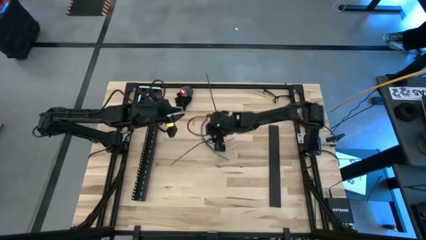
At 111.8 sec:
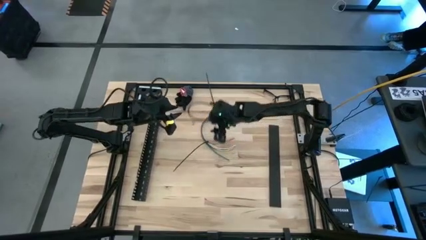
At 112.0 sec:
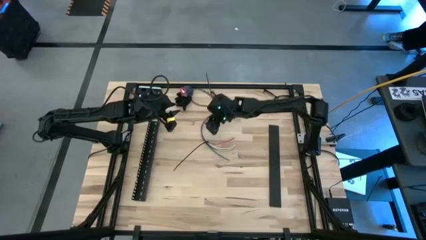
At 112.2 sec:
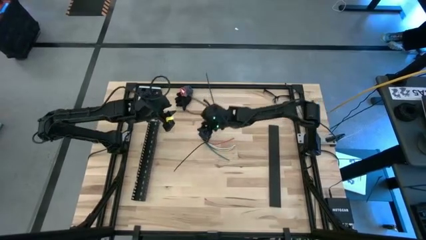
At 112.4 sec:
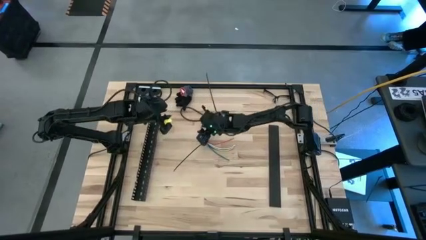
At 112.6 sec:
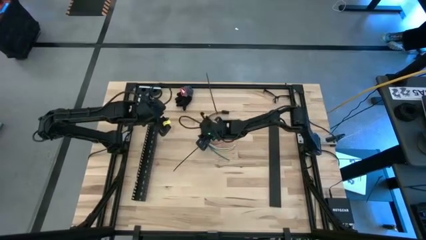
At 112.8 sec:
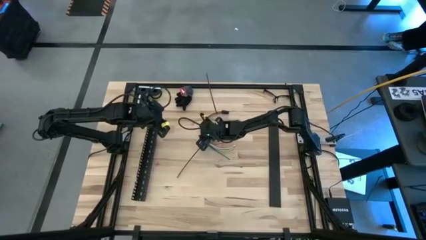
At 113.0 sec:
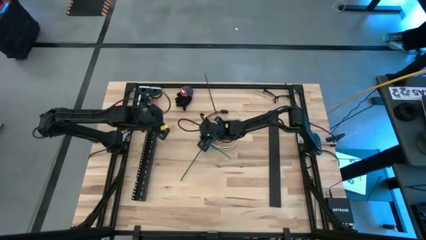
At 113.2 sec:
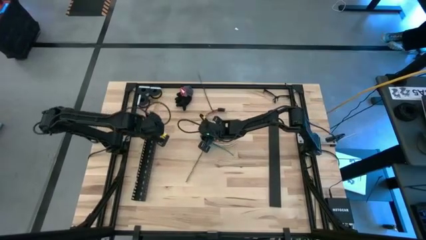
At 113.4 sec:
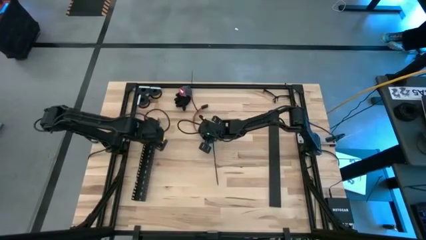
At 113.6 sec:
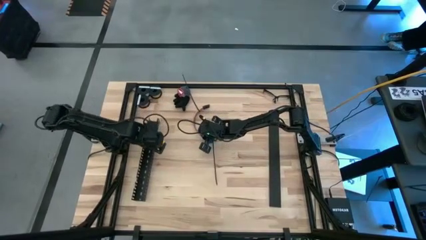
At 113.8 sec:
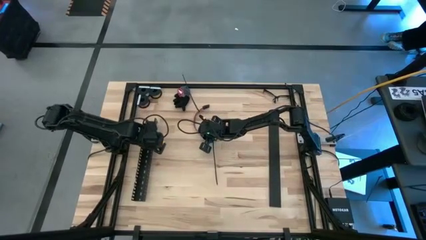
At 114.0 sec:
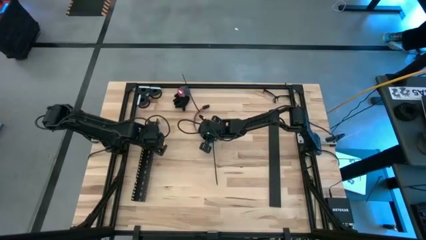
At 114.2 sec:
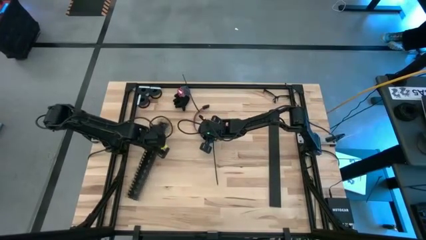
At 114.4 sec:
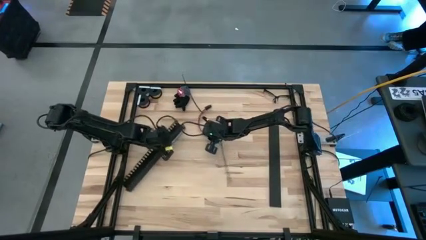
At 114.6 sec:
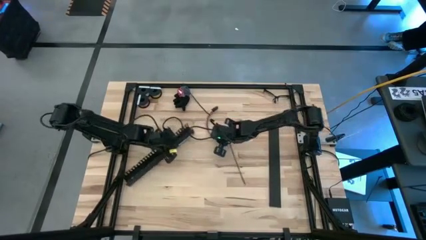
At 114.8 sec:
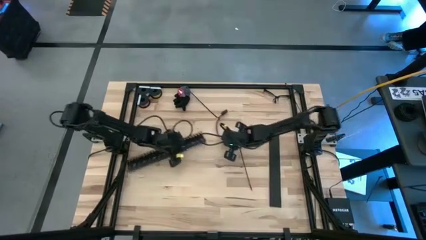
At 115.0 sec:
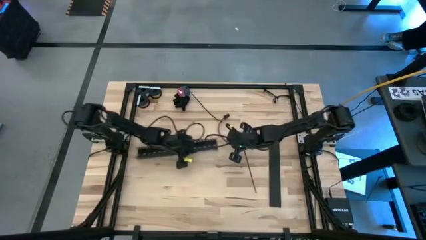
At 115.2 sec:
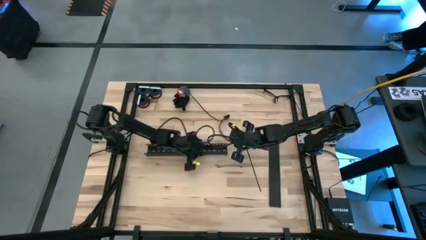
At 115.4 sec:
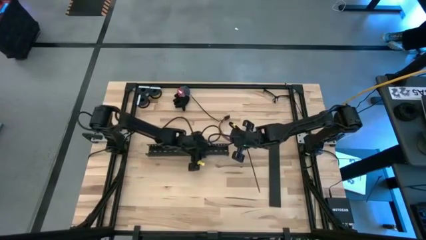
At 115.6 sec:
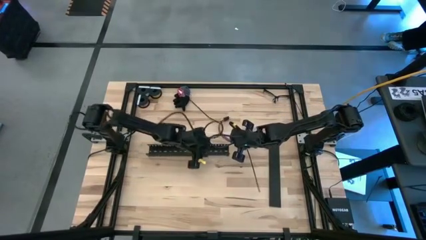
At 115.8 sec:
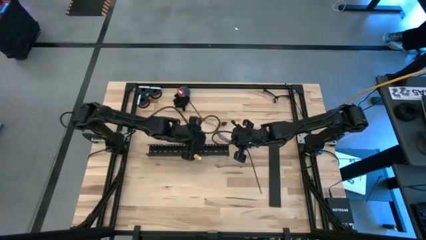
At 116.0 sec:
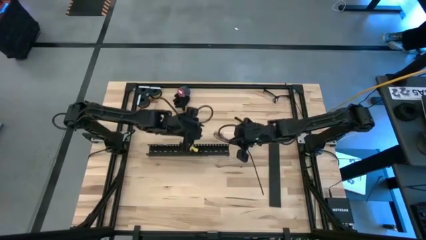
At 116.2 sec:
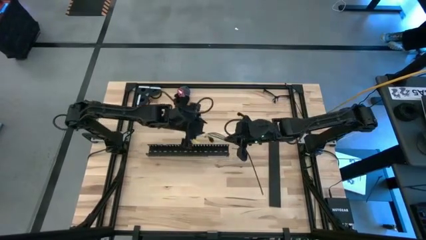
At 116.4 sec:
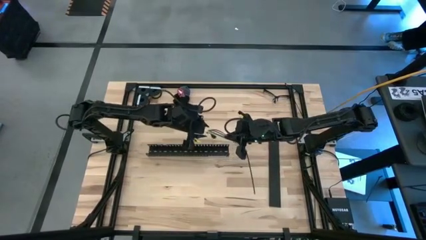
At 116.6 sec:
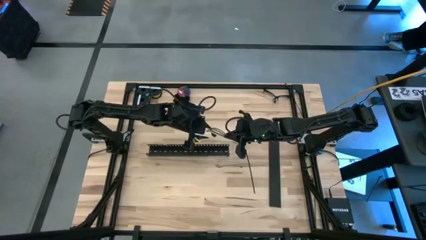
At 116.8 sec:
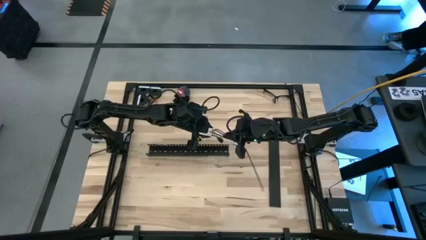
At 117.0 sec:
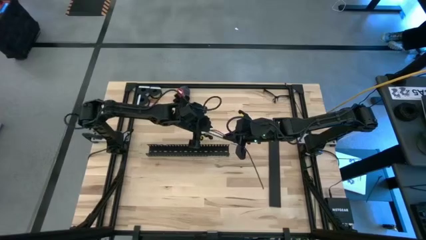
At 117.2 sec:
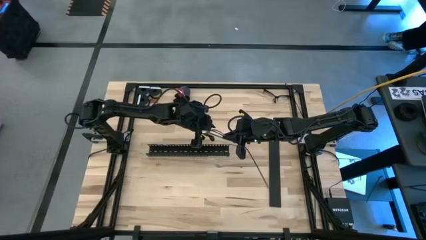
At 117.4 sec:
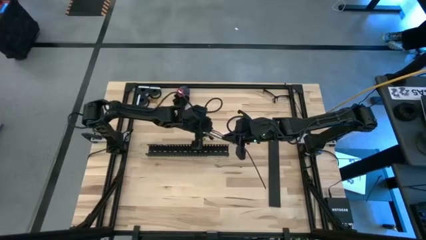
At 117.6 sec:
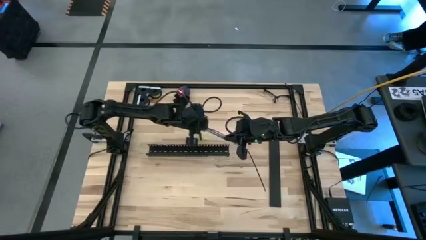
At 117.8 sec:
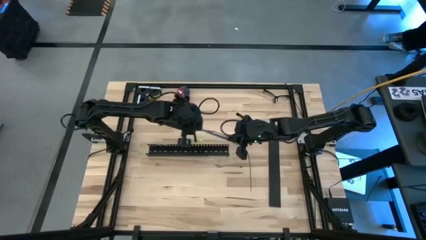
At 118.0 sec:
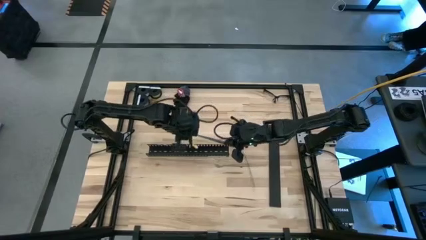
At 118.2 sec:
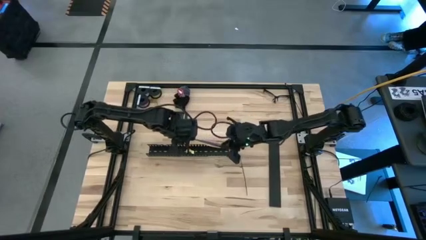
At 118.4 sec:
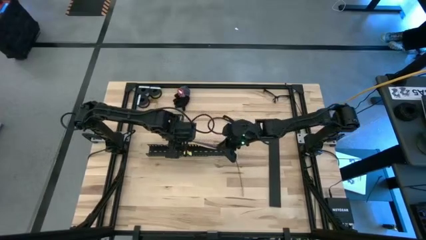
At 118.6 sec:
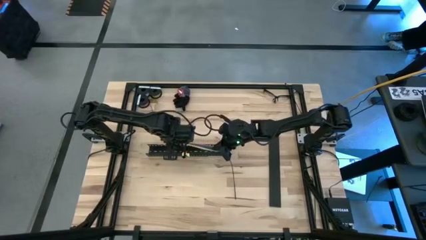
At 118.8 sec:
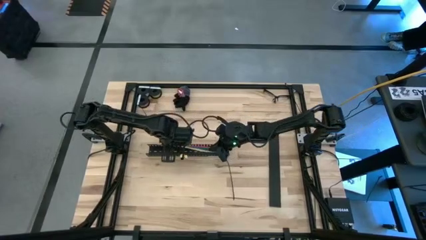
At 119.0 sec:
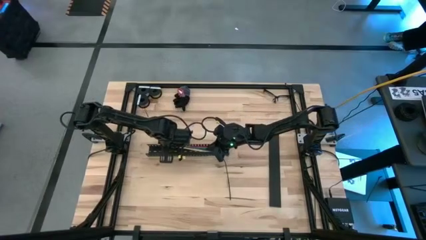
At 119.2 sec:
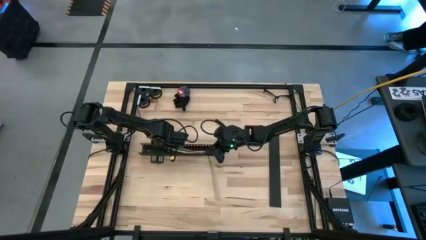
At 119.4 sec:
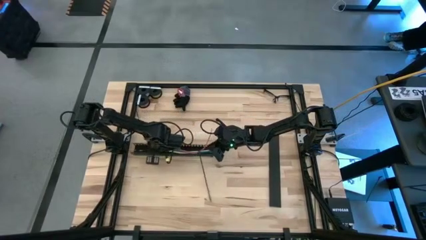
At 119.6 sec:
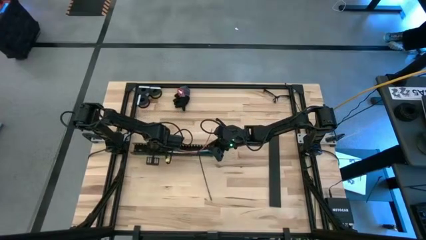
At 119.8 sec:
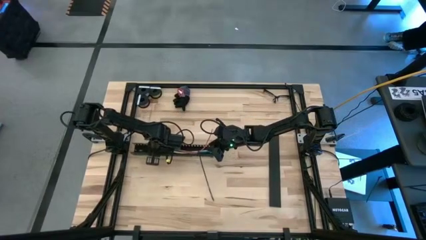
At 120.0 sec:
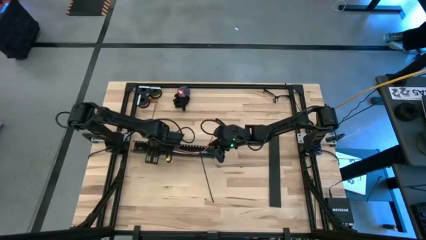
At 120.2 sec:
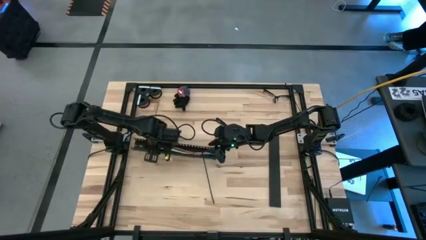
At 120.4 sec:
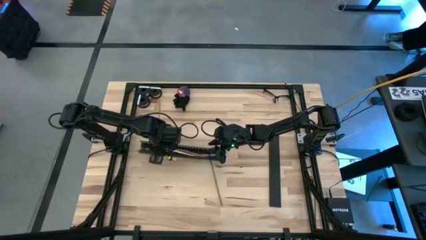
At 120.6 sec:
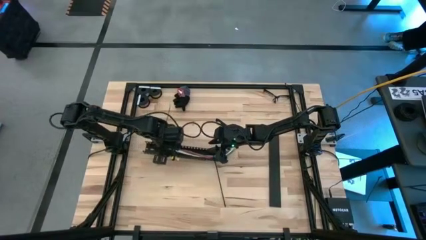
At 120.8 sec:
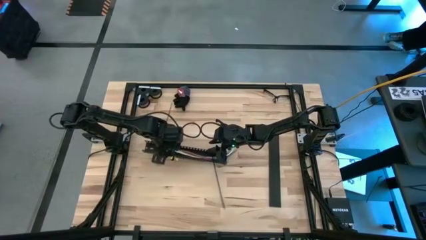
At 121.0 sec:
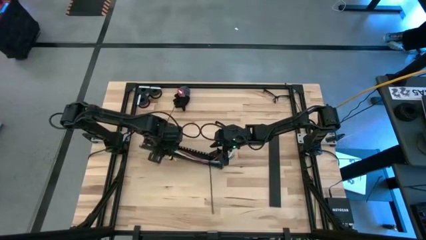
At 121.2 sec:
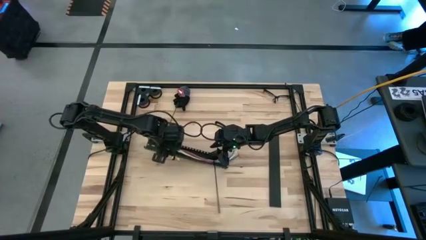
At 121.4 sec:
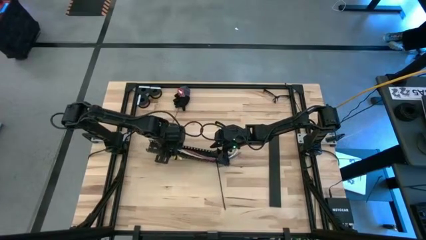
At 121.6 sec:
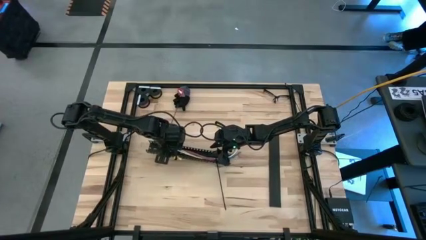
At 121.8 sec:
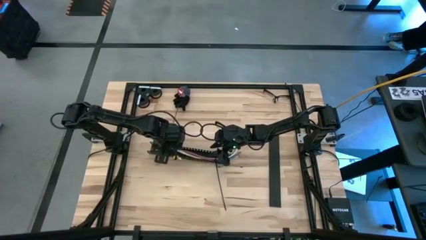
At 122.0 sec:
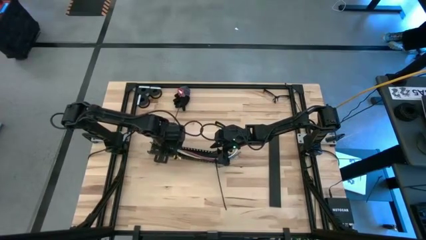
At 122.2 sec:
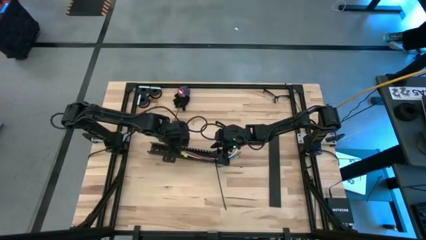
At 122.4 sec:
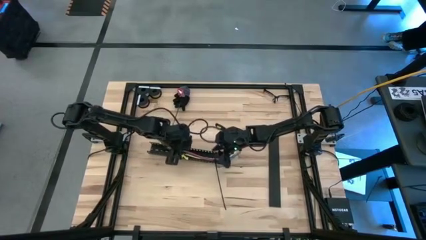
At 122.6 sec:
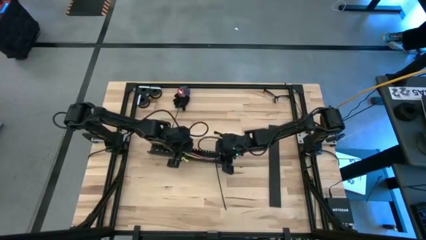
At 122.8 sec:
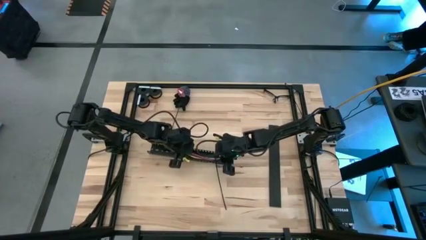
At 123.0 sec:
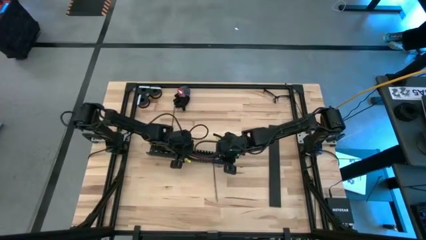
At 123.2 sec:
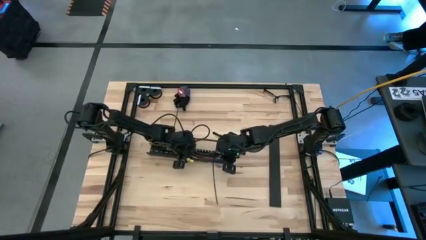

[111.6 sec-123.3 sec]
Task: Ziptie cables
Put the zip tied cable wires into the black cable duct

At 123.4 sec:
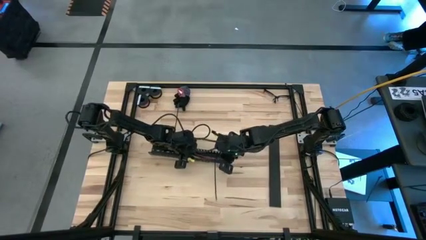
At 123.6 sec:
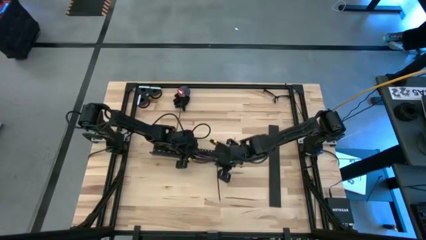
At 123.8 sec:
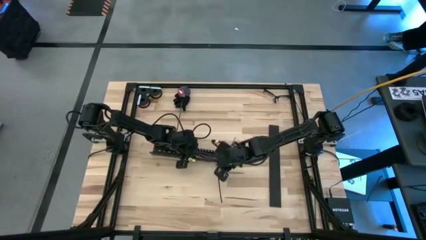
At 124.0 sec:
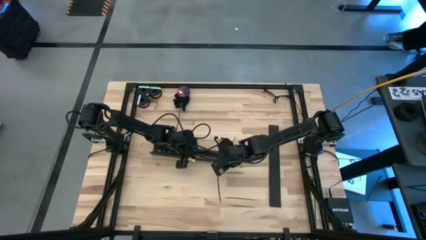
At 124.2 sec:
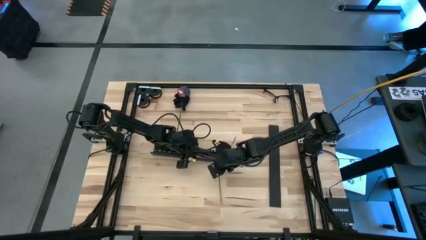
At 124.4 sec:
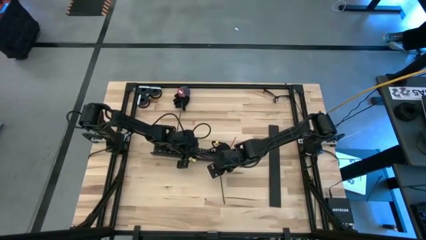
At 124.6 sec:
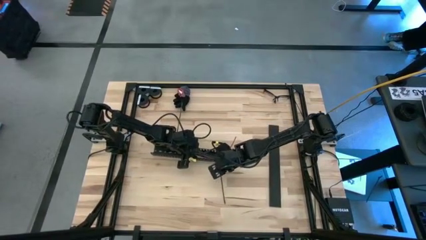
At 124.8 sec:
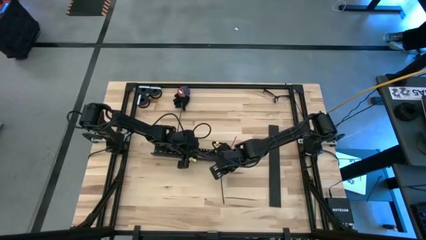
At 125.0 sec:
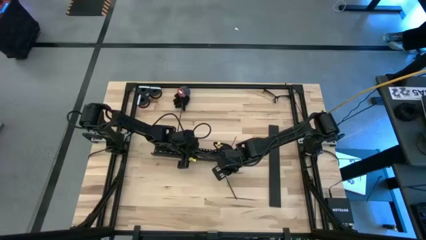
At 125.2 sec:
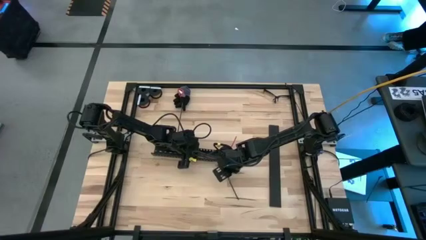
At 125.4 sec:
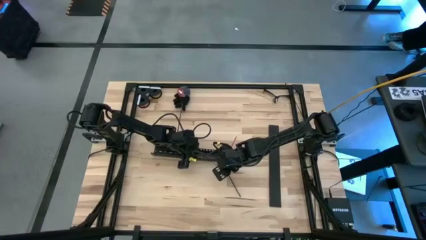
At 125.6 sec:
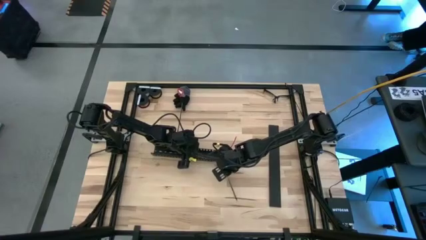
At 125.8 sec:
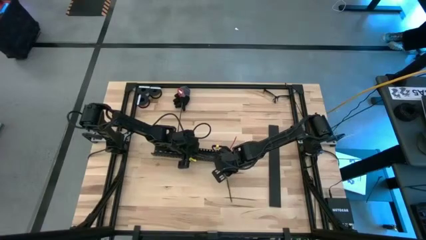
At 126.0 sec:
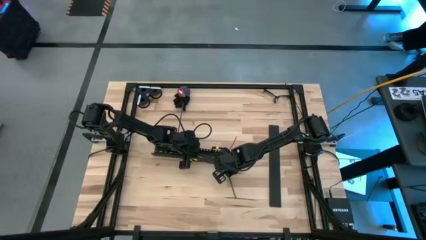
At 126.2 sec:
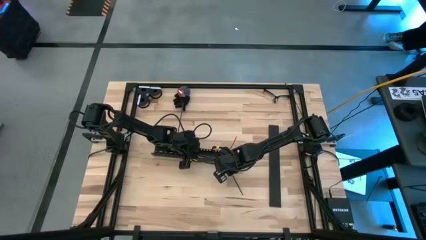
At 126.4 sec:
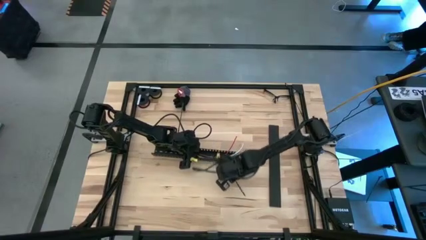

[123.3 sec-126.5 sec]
Put the zip tied cable wires into the black cable duct
